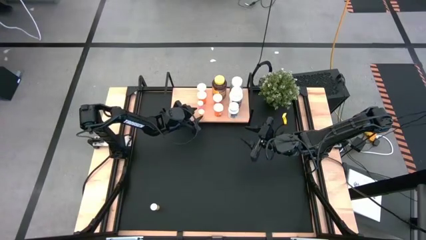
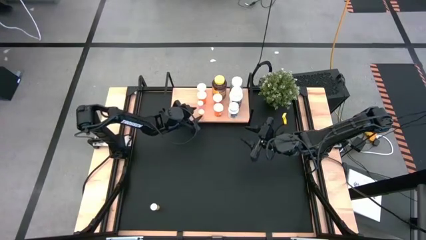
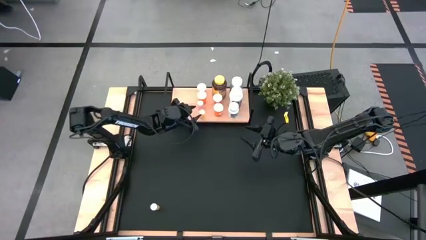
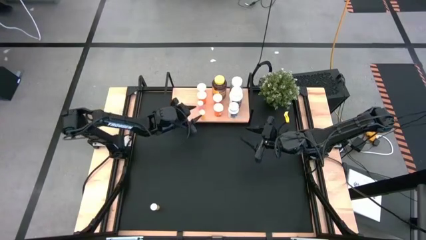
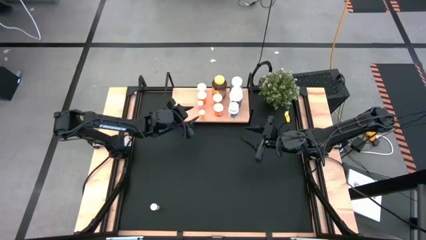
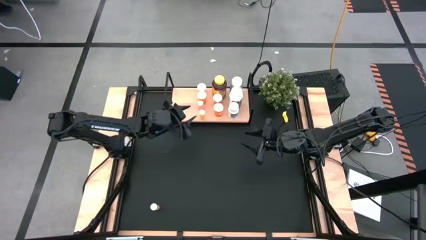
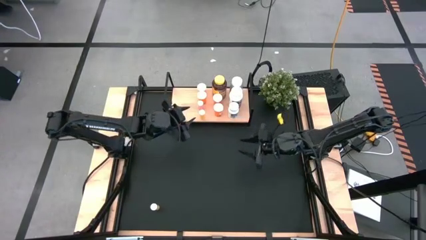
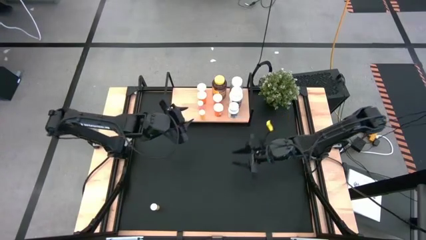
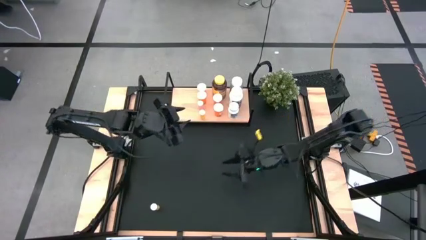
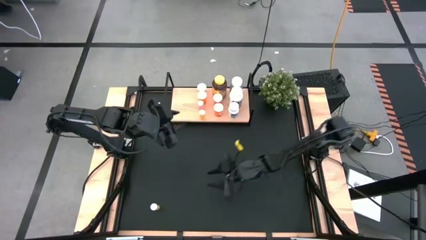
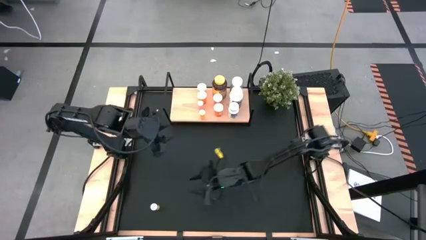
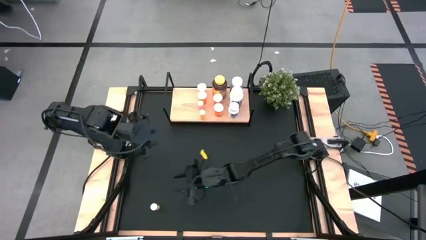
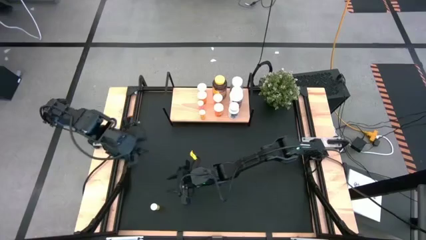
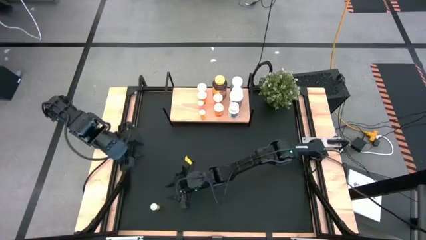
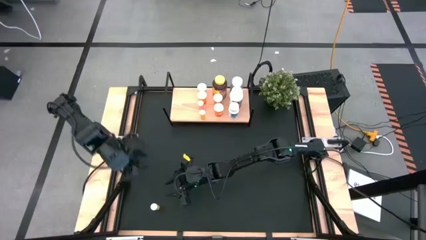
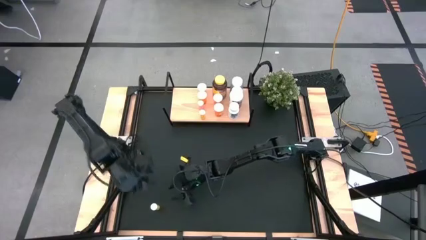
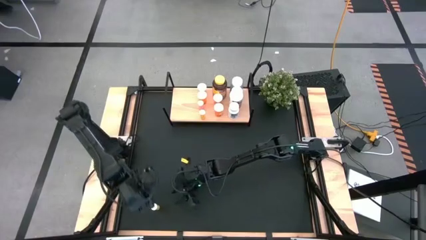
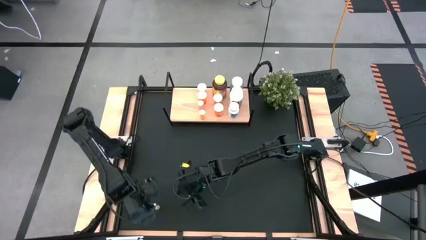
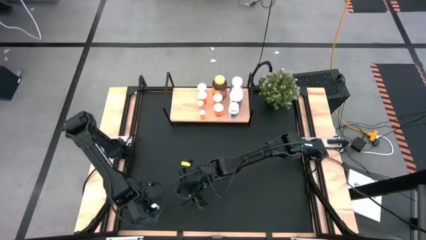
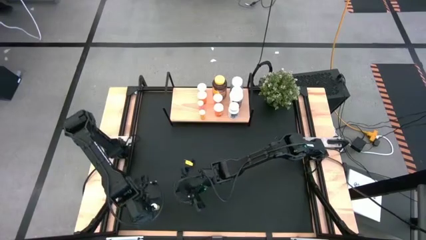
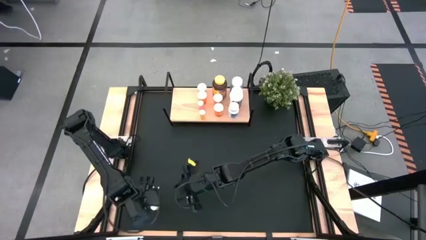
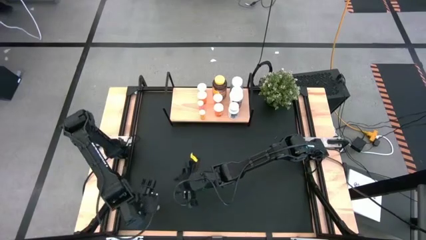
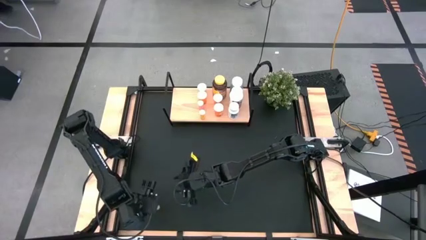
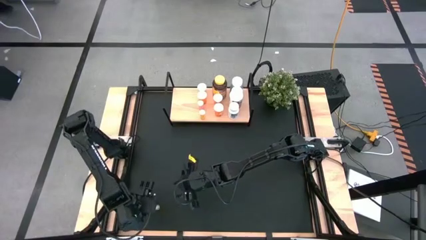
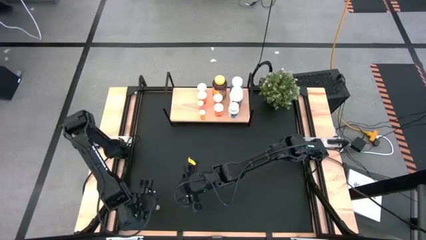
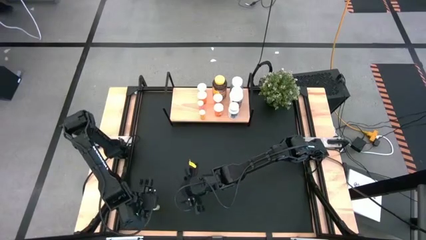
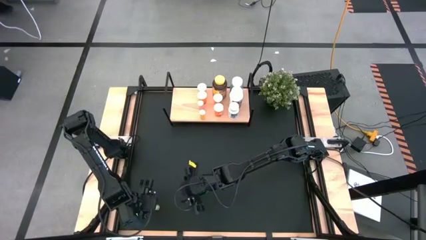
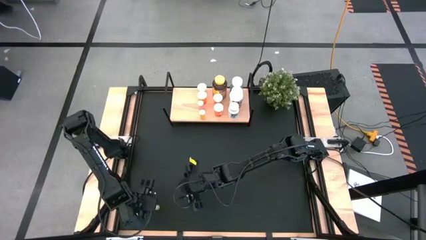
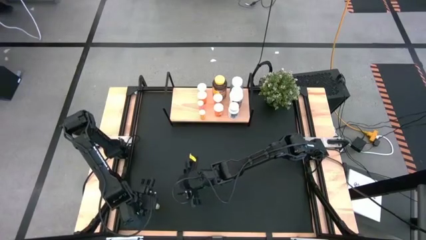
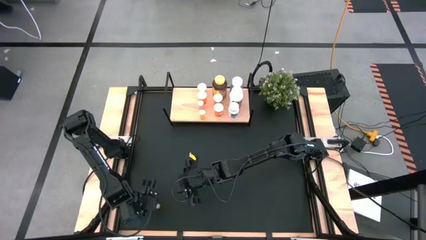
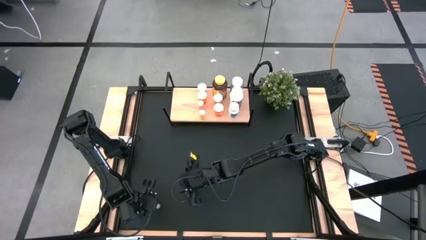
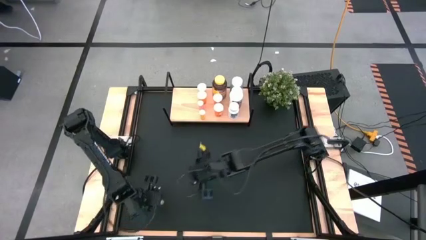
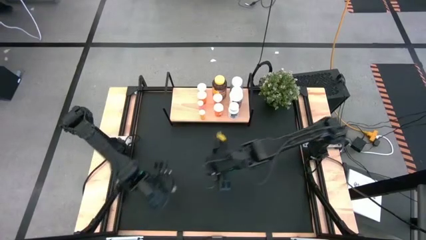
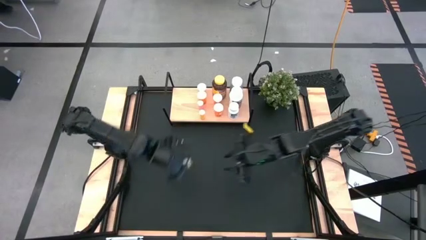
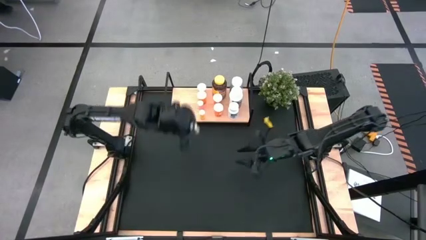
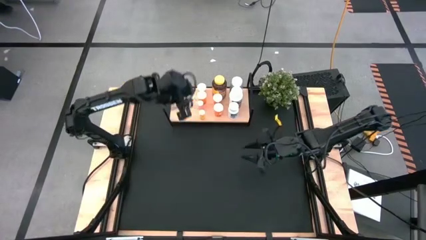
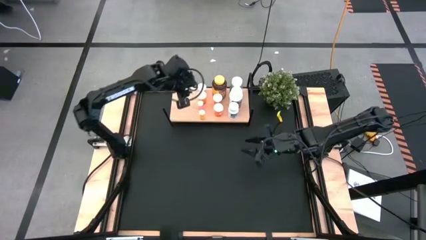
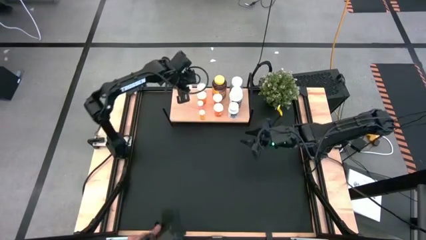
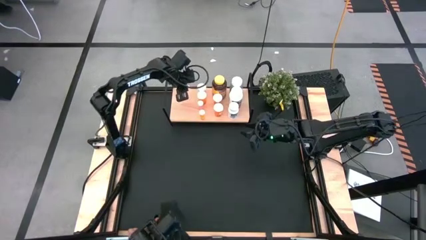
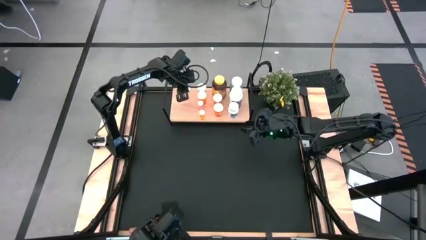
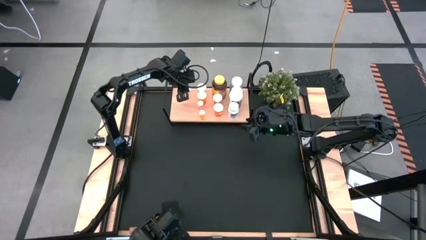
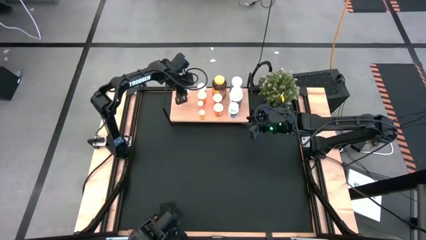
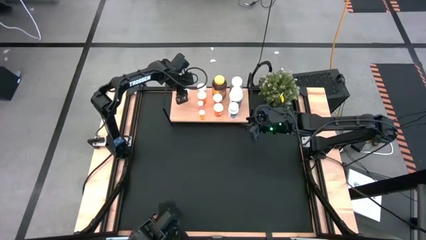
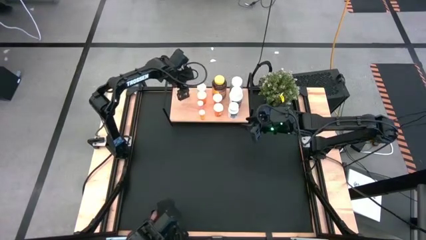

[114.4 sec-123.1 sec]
Task: Pick and place medicine bottles onto shelf by color
Put the light yellow pill bottle on the shelf

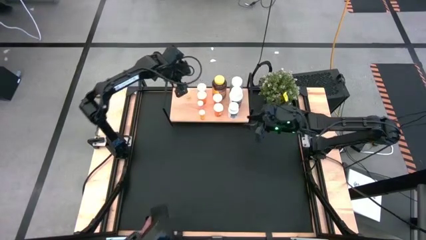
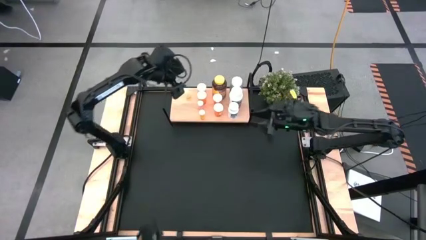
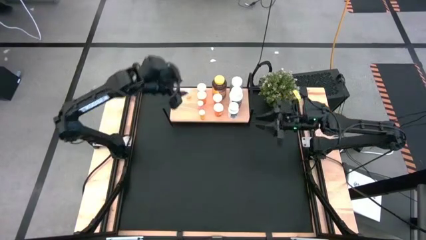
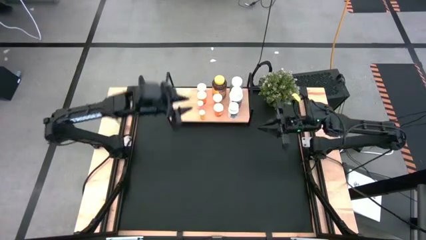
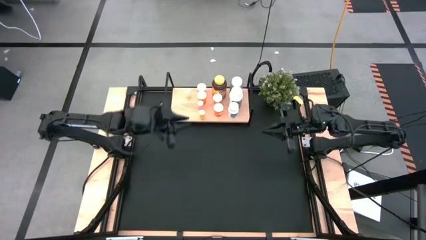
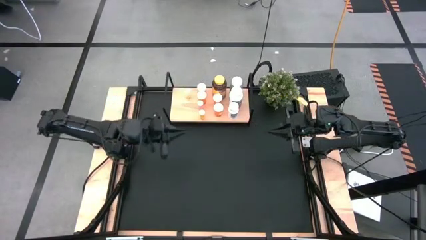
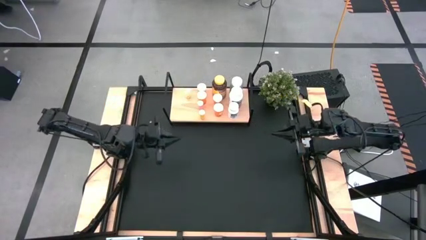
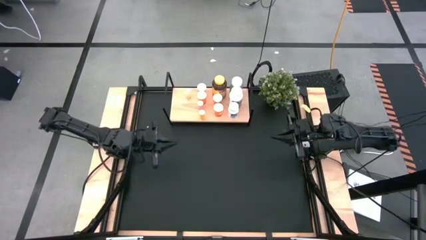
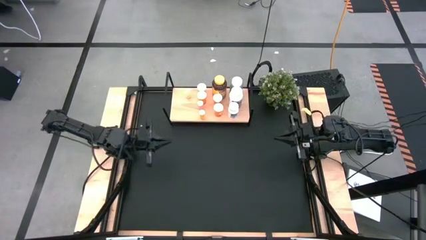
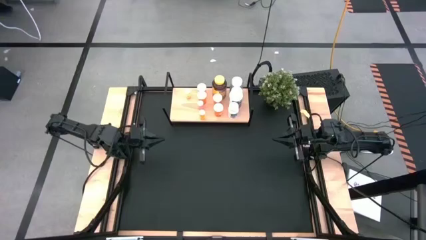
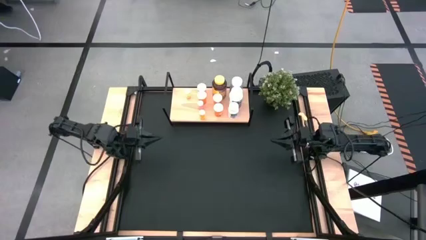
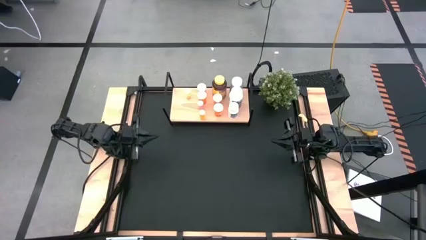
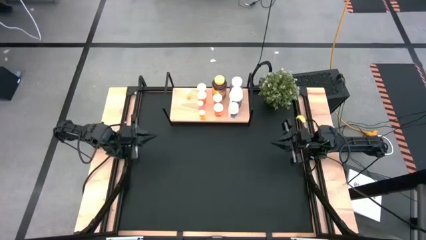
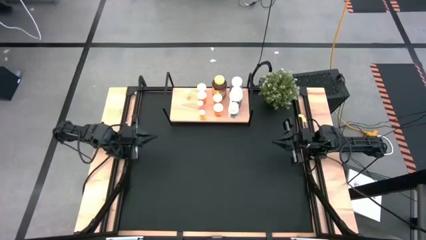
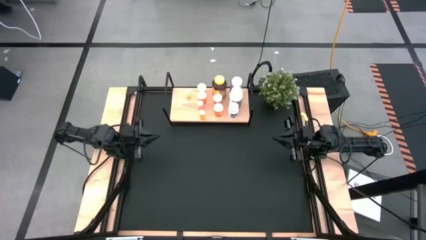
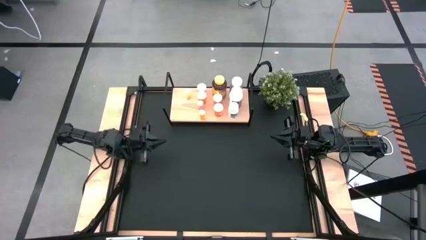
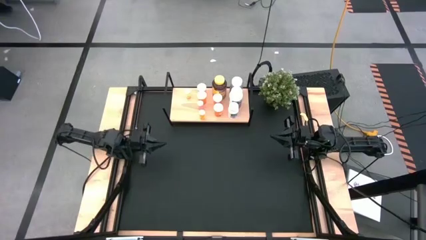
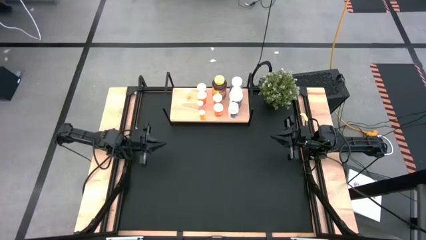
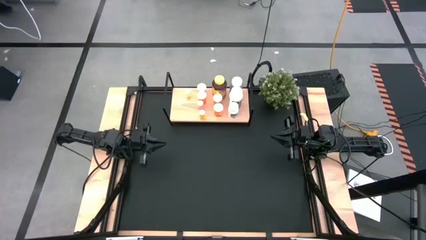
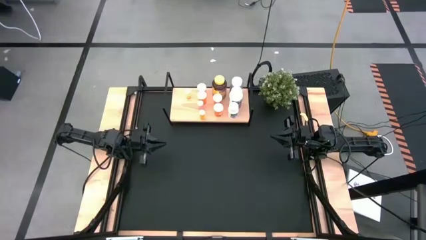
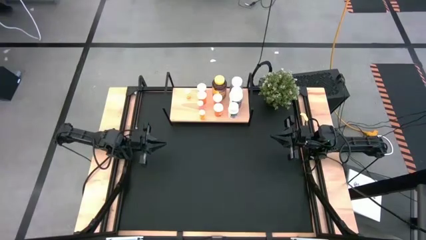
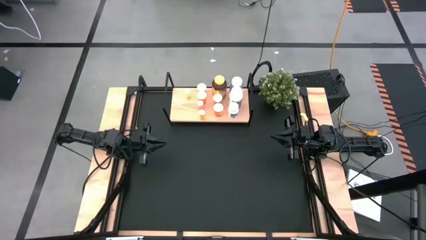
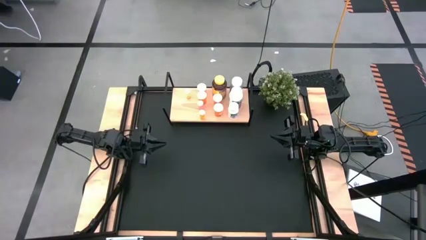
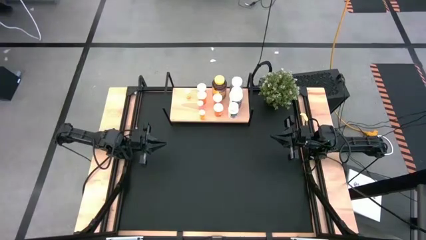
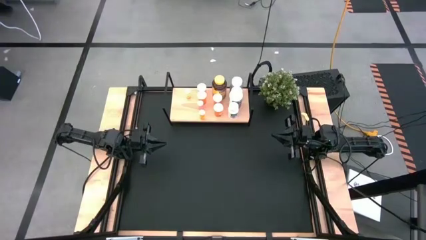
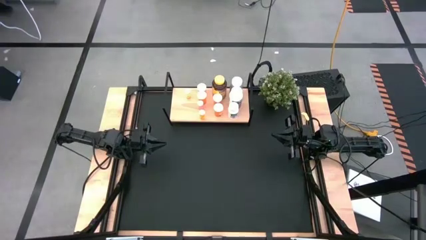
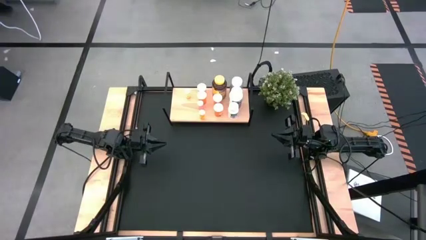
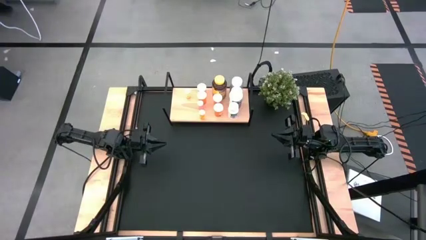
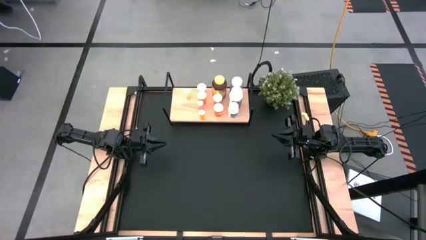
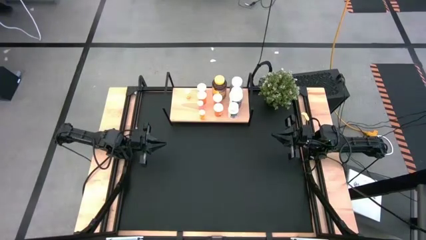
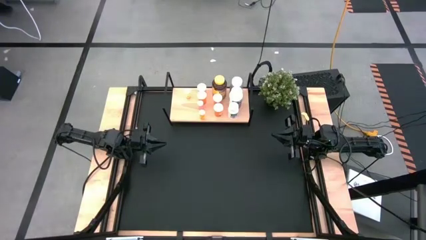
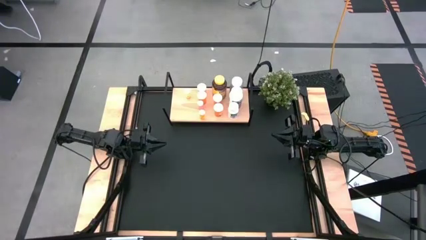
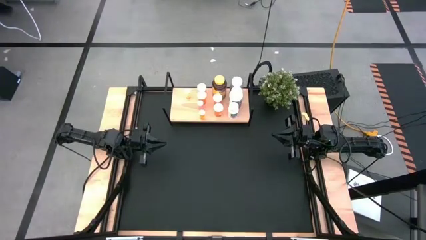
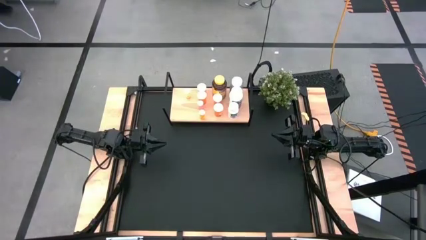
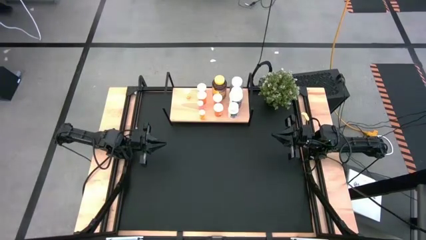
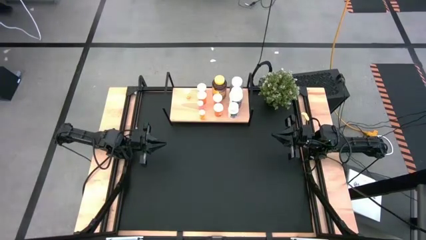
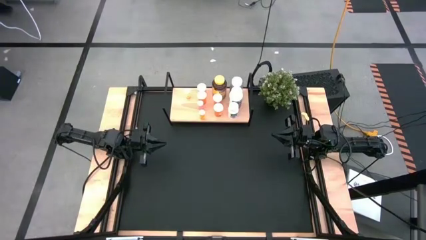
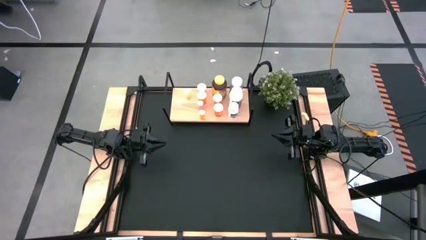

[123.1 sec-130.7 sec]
Return to Home Position

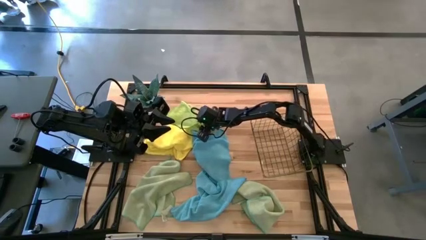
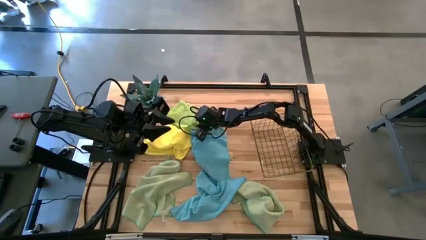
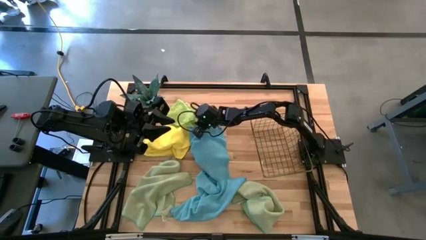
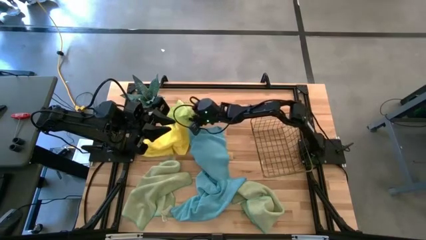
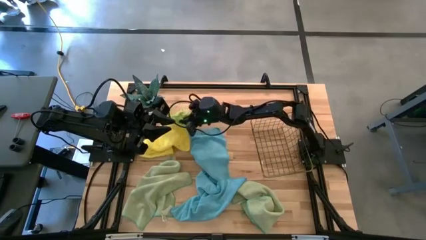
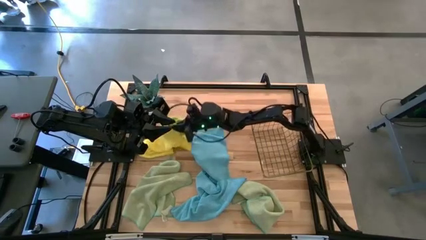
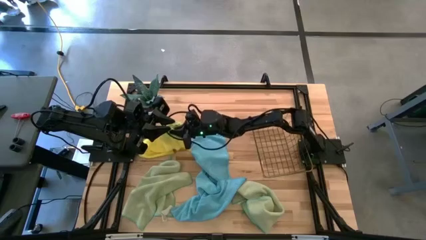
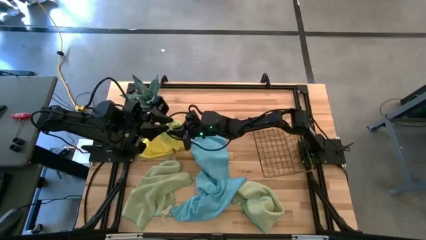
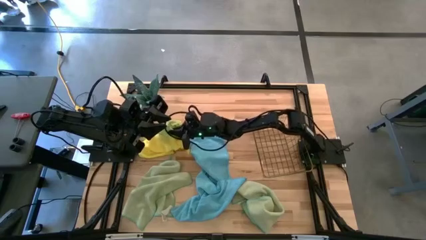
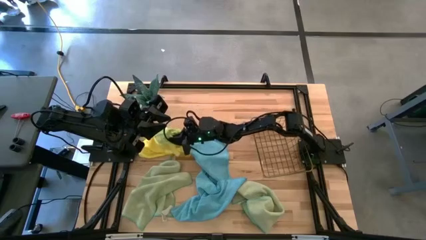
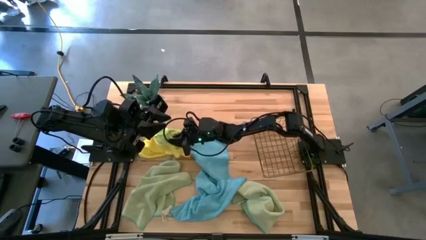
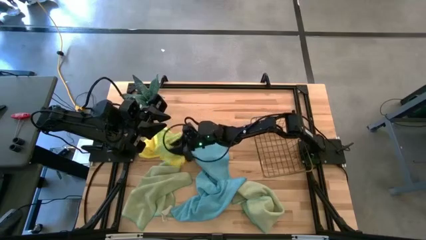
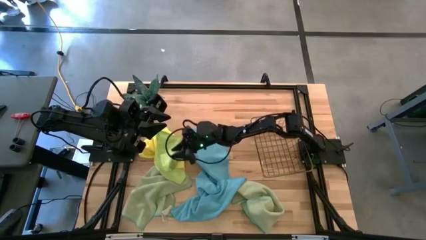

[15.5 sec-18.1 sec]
Task: Fold microfiber towels
Move the light green microfiber cloth to the middle left of the table
